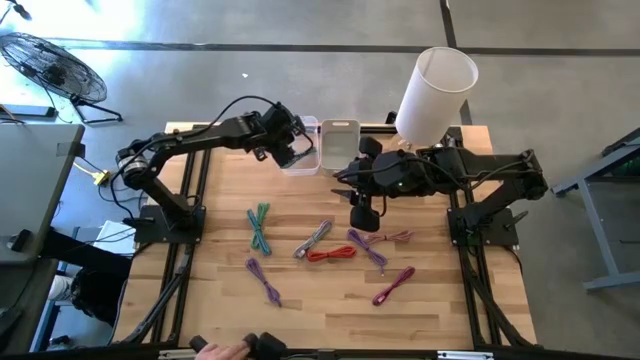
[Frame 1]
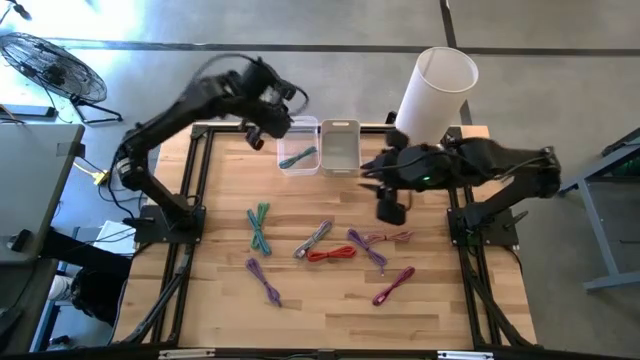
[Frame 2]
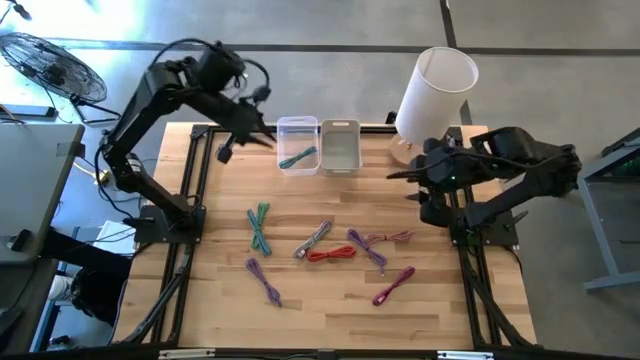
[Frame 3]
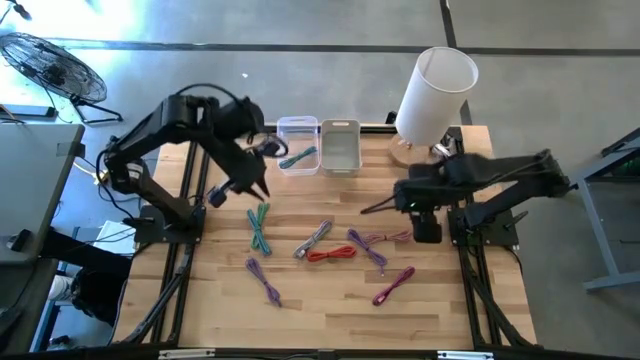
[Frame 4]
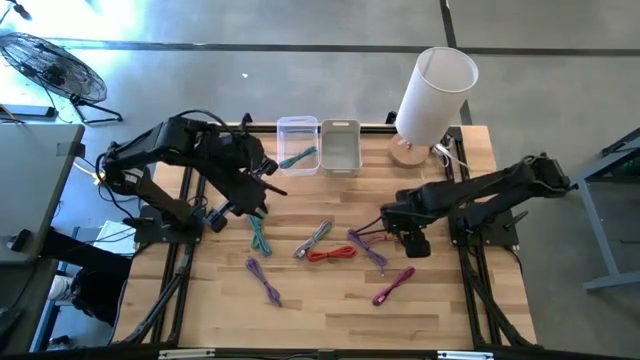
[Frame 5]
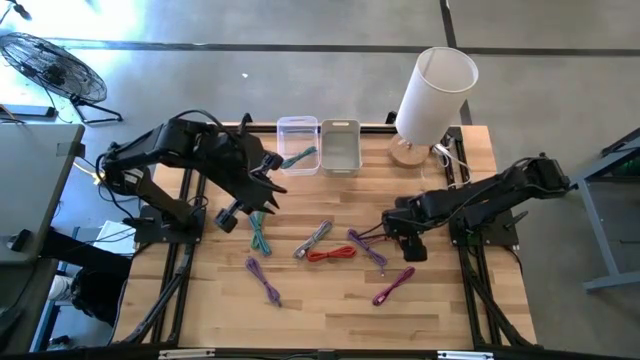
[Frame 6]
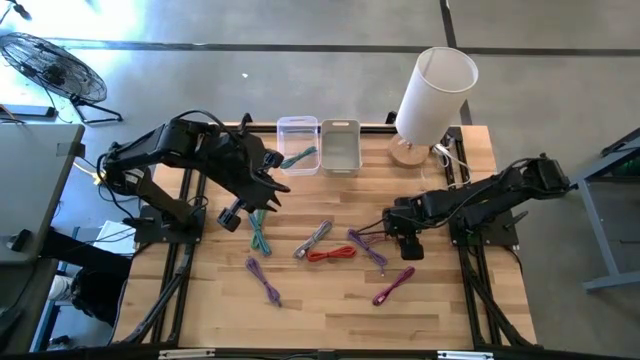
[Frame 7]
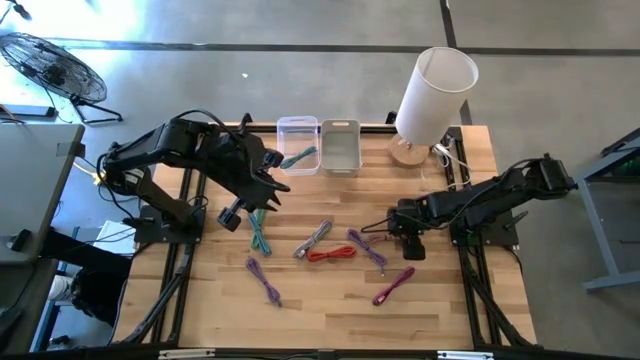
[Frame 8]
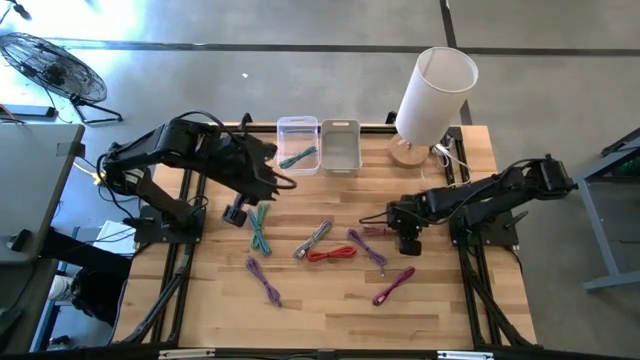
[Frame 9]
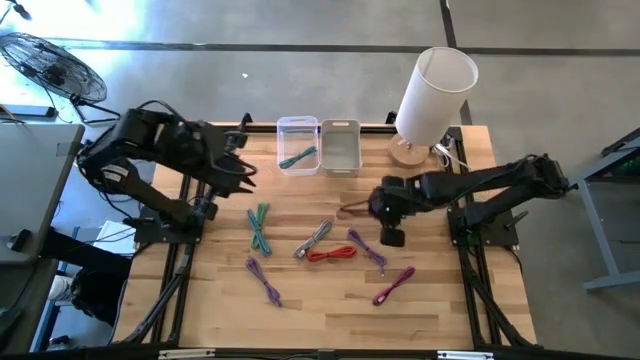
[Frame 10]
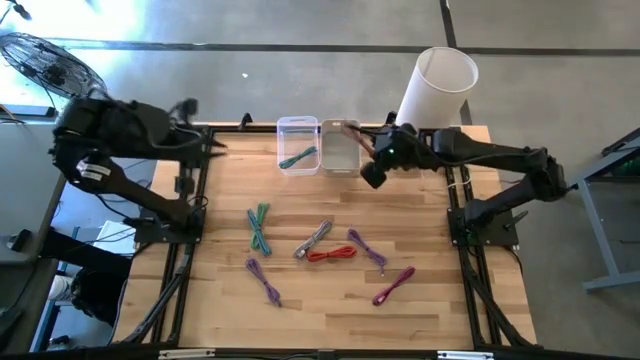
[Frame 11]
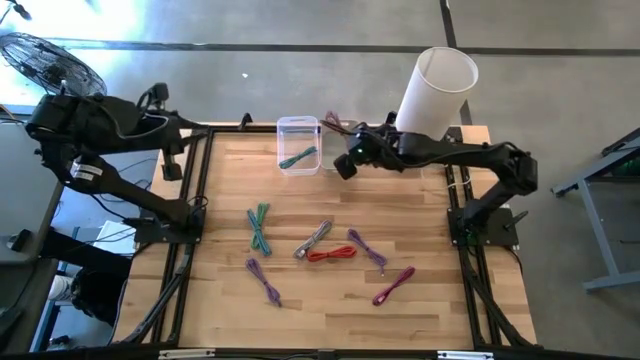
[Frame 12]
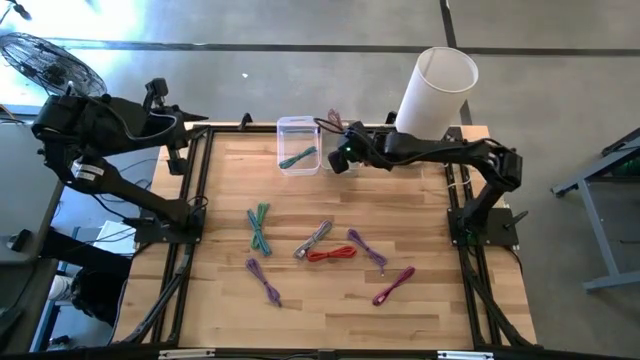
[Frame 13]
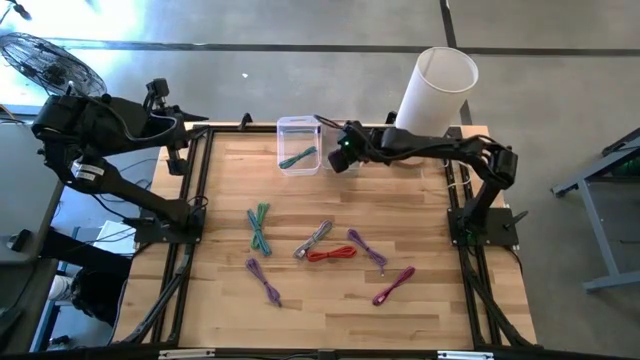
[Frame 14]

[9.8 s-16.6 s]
Task: Pick & Place USB Port
Put the pink charger cable into the gray bin

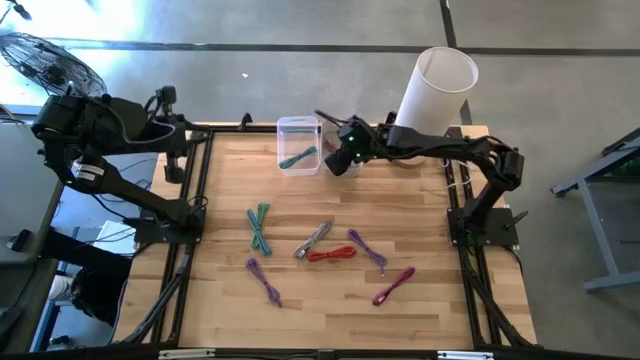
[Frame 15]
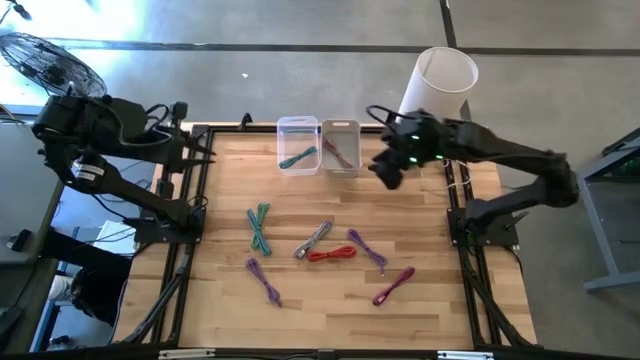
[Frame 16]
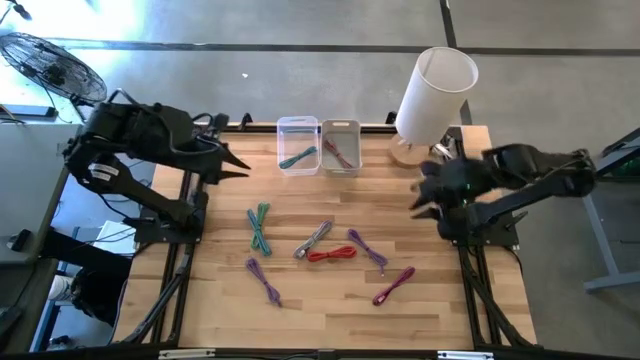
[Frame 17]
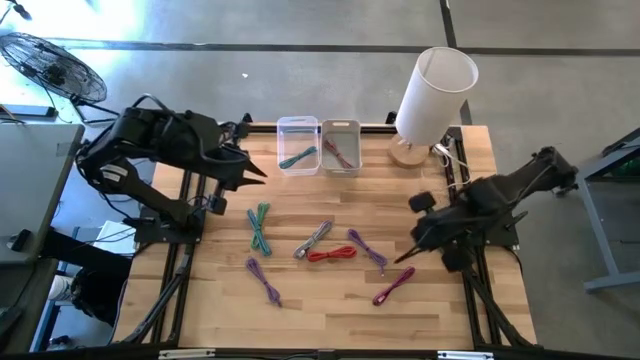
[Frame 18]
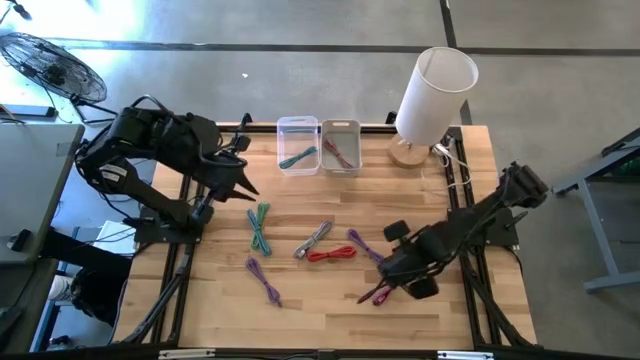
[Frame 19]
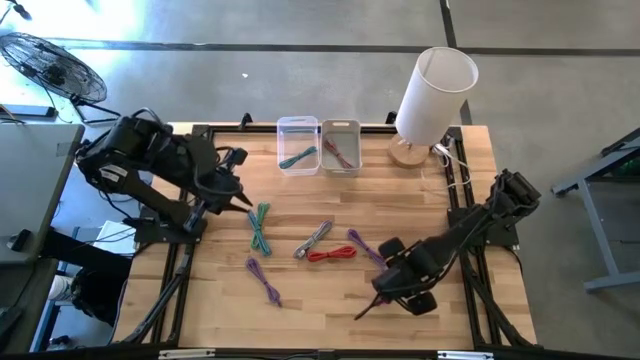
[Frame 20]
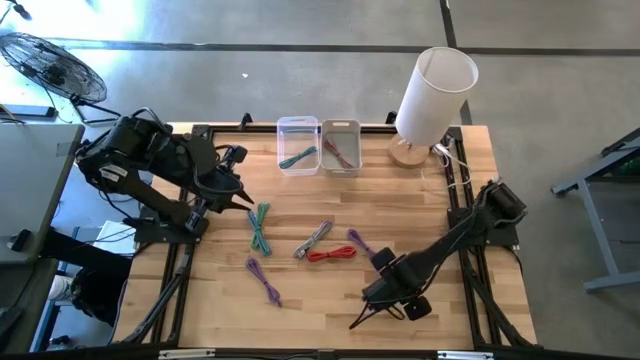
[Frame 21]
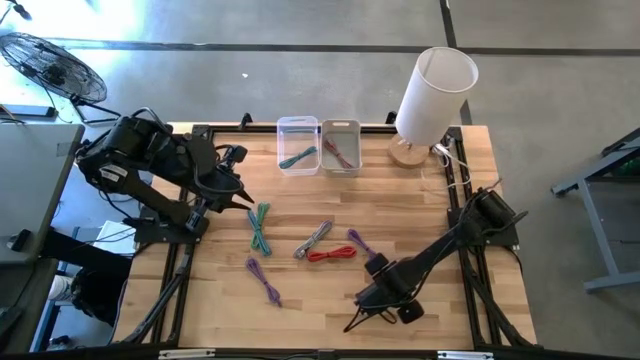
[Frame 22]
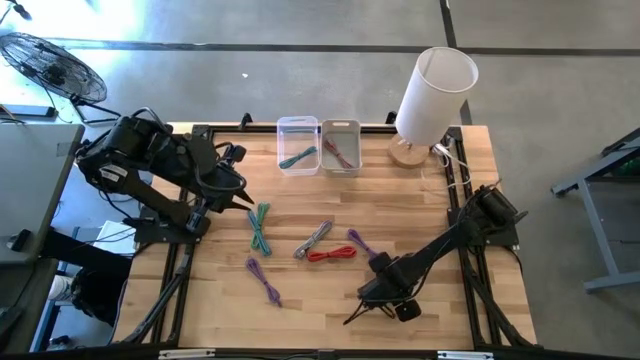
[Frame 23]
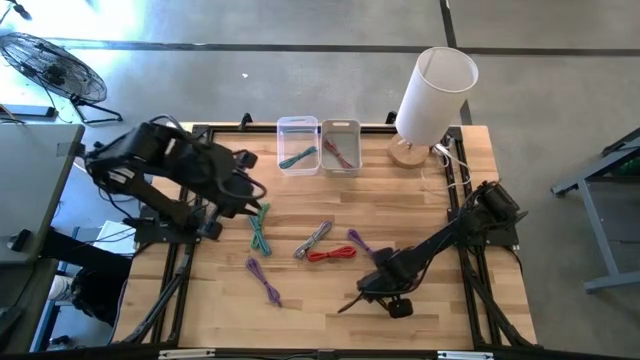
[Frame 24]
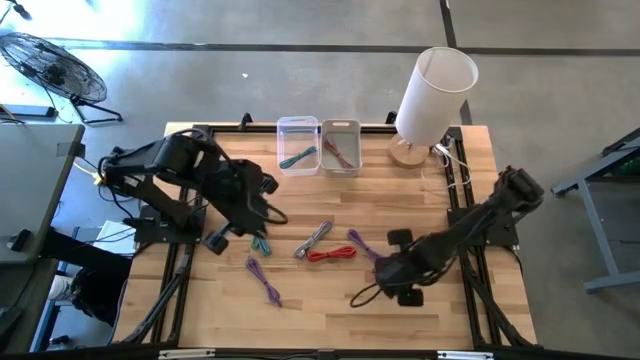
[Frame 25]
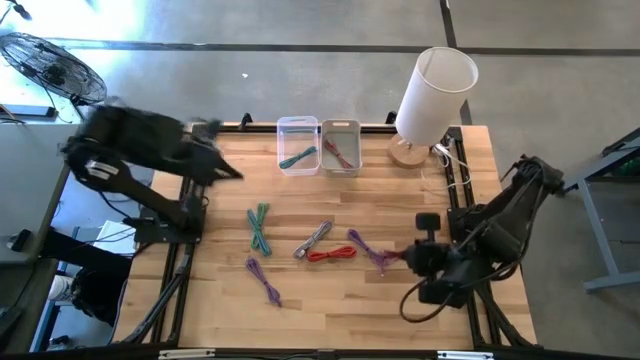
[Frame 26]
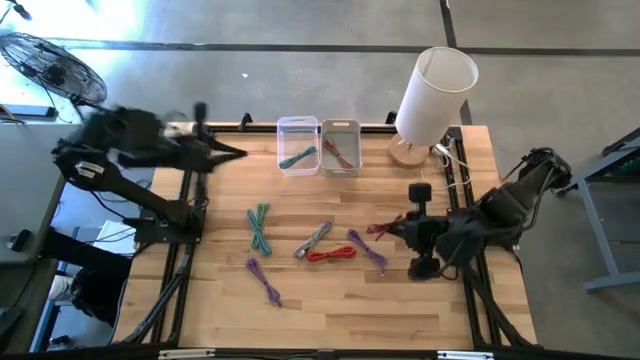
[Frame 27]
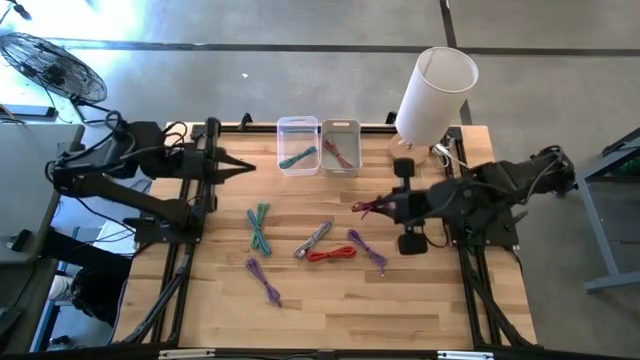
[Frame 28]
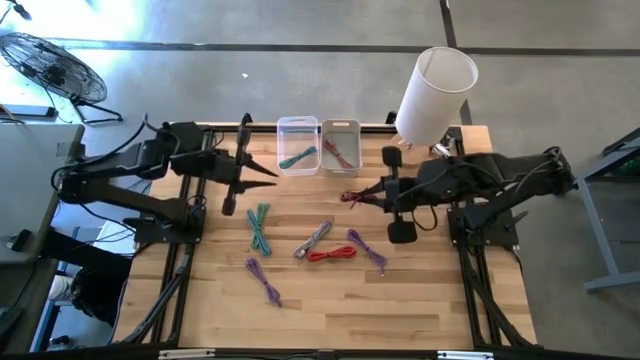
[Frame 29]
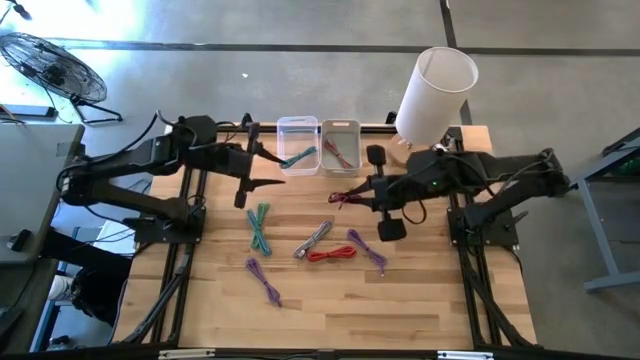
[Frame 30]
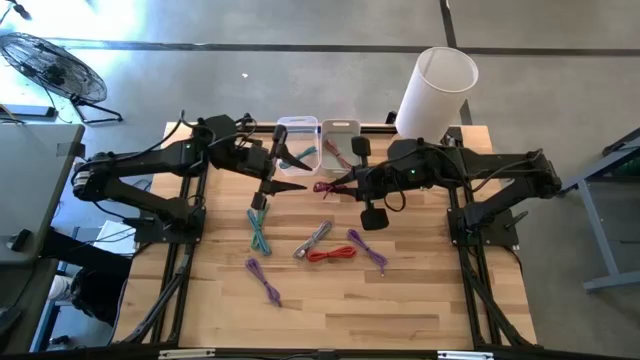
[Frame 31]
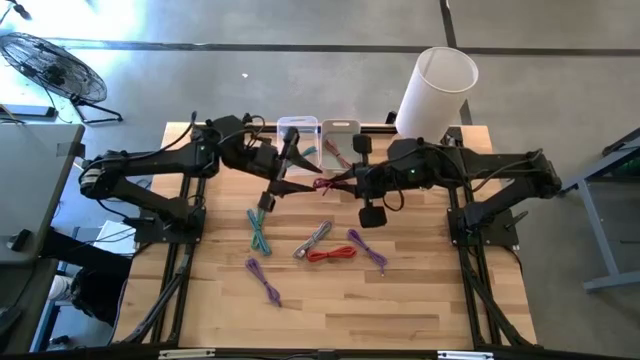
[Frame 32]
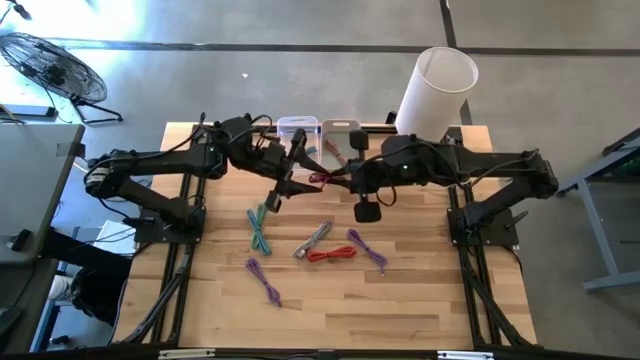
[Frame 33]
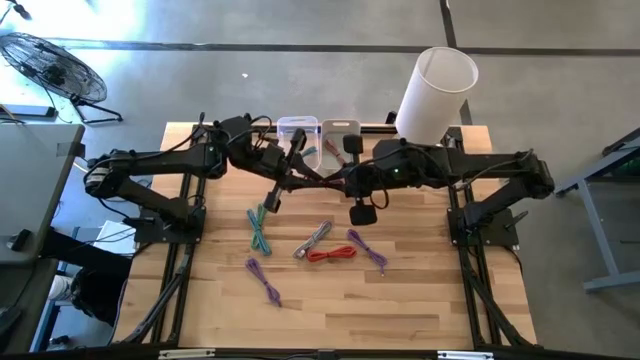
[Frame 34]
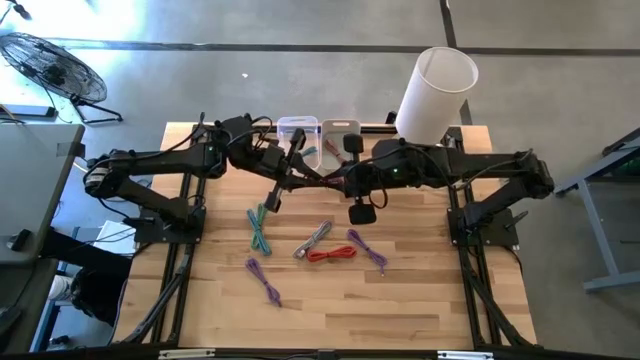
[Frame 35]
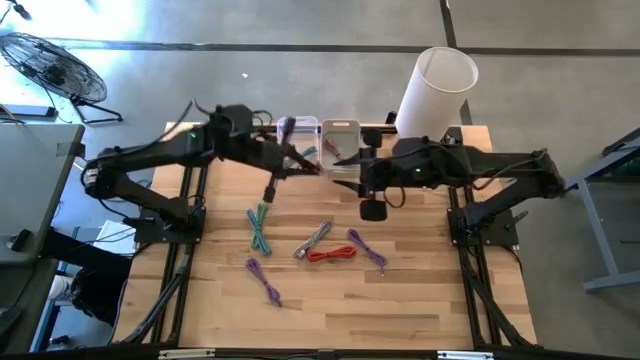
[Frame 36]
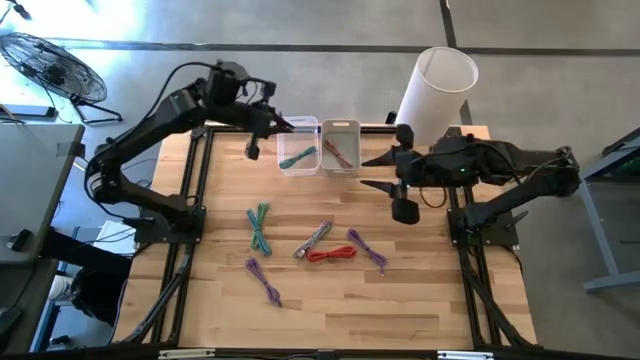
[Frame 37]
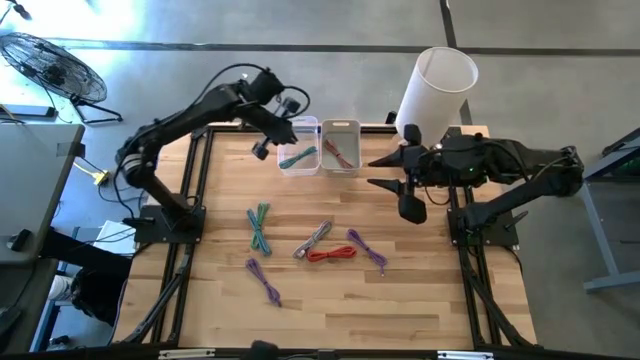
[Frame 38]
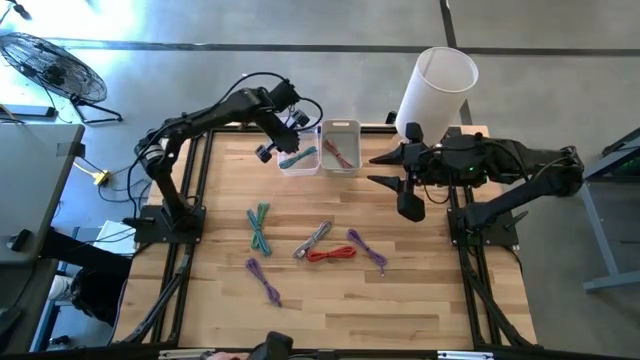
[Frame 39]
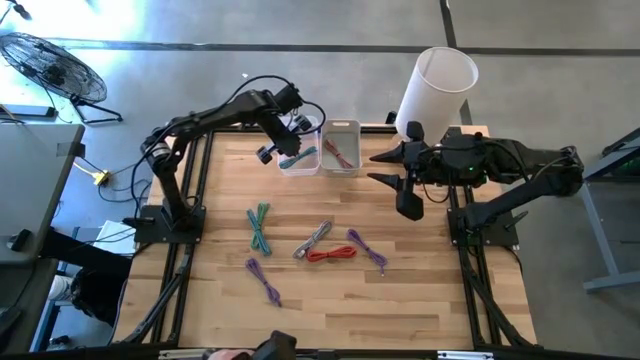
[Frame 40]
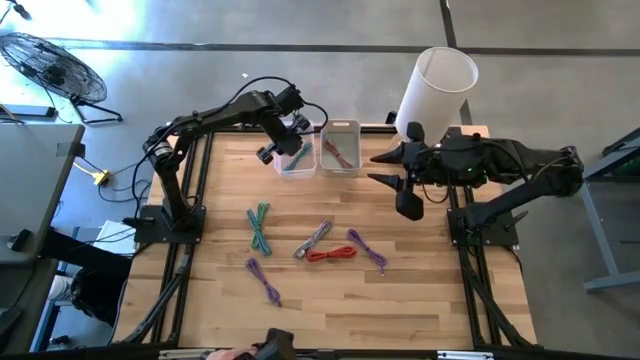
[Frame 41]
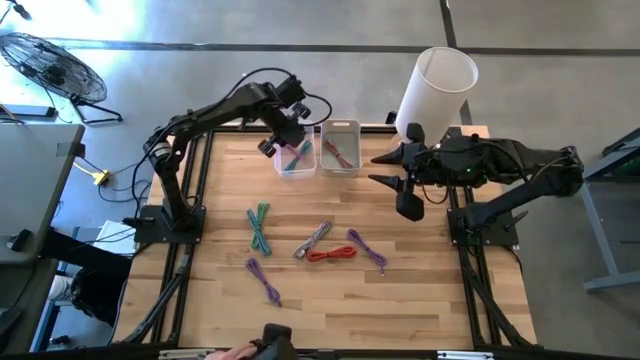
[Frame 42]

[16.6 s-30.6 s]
Put the pink patterned charger cable into the transparent bin
